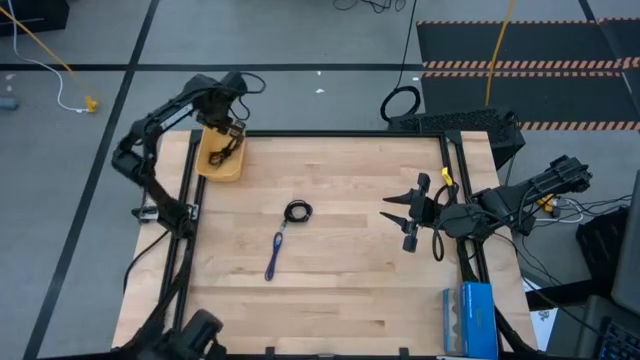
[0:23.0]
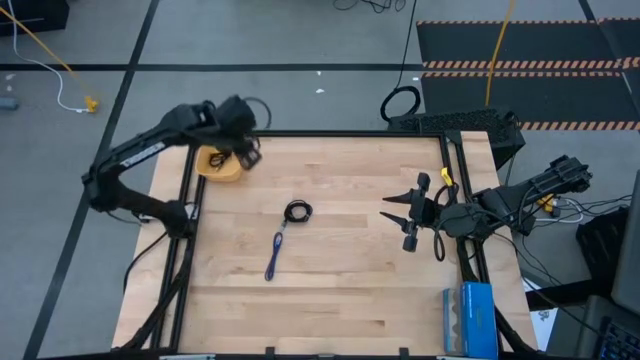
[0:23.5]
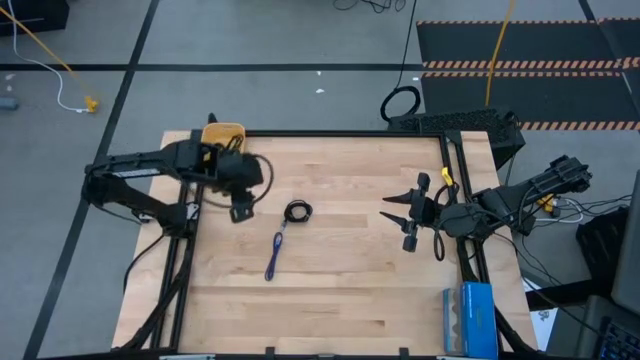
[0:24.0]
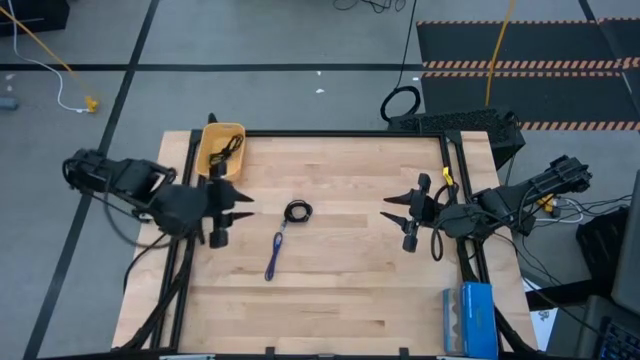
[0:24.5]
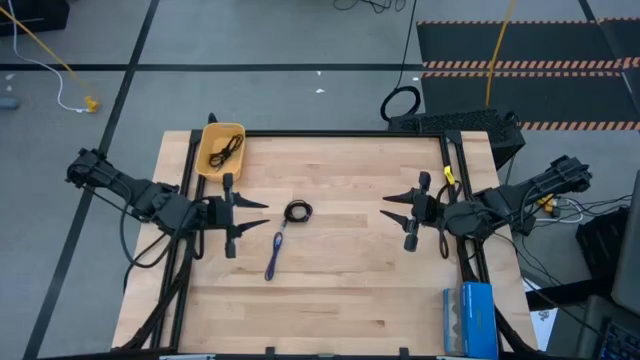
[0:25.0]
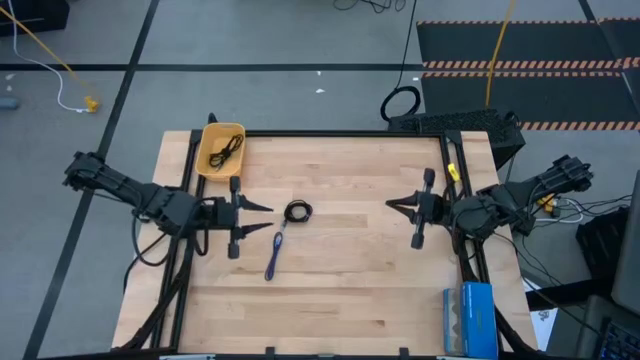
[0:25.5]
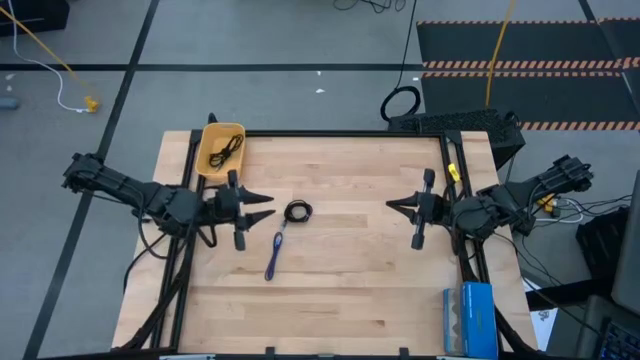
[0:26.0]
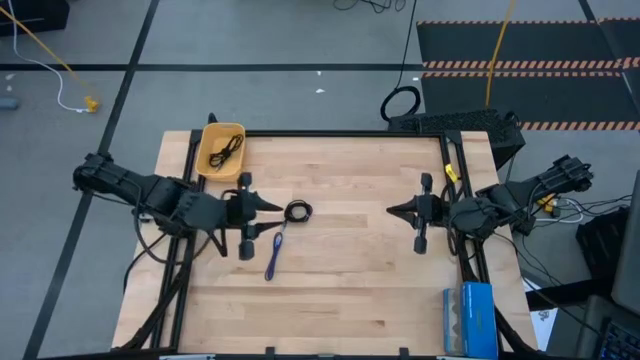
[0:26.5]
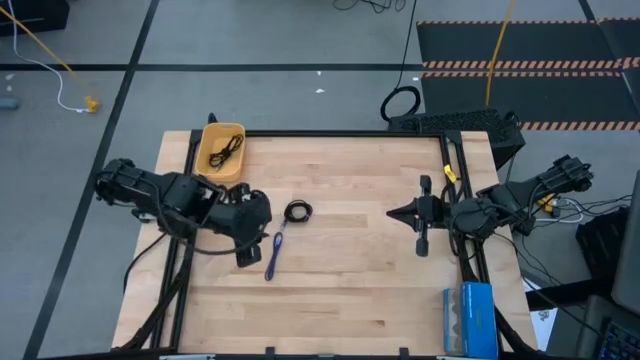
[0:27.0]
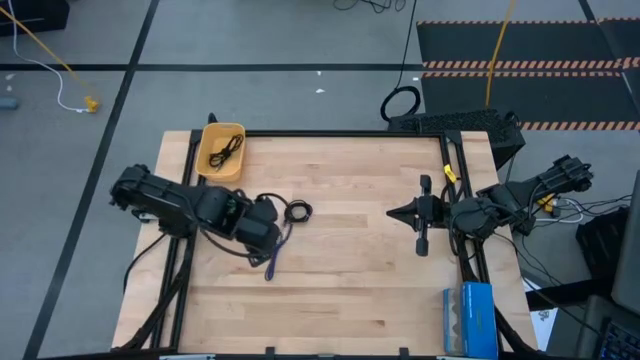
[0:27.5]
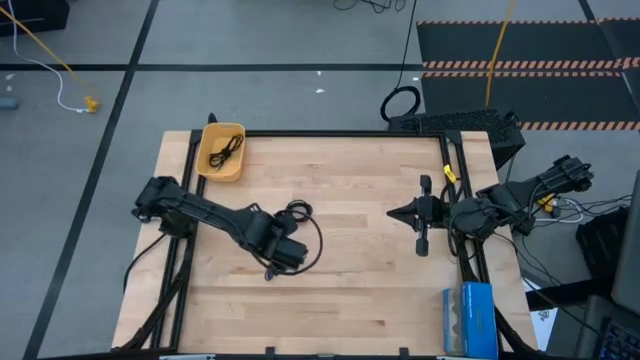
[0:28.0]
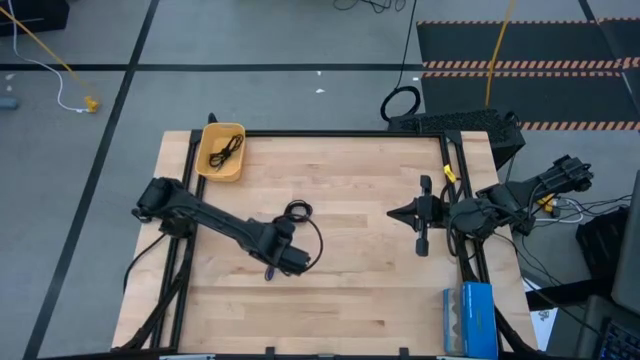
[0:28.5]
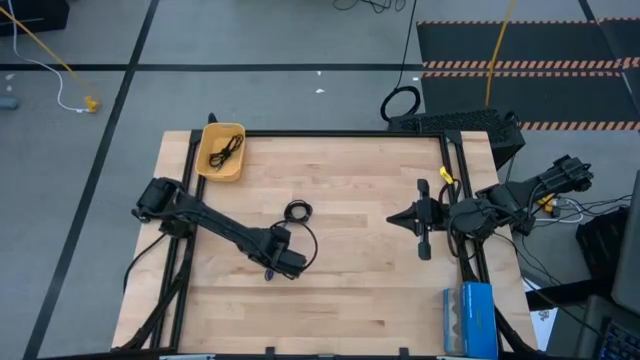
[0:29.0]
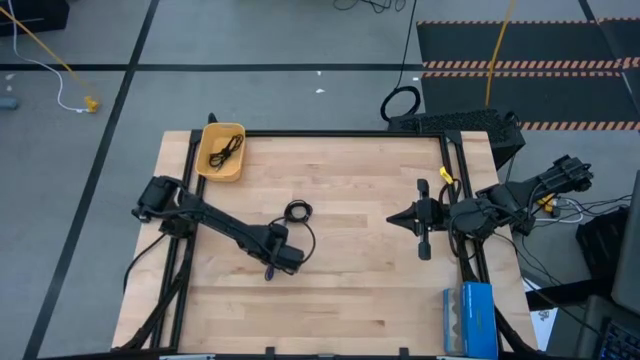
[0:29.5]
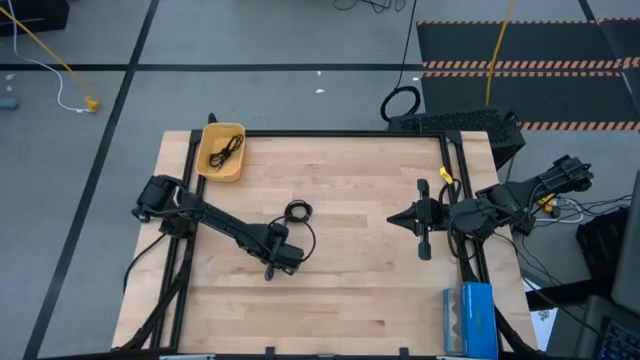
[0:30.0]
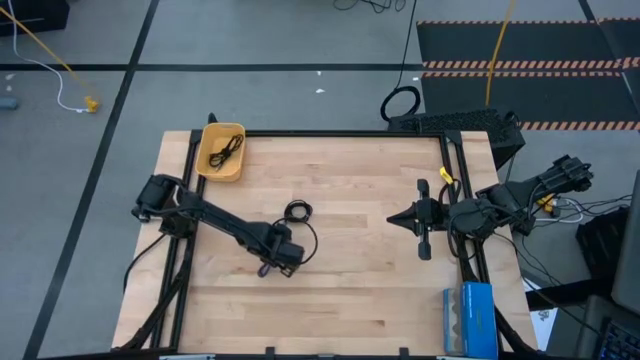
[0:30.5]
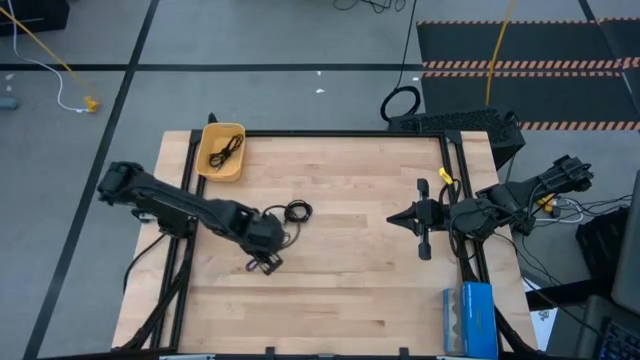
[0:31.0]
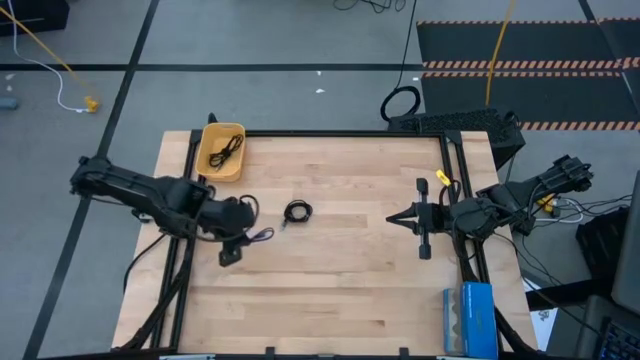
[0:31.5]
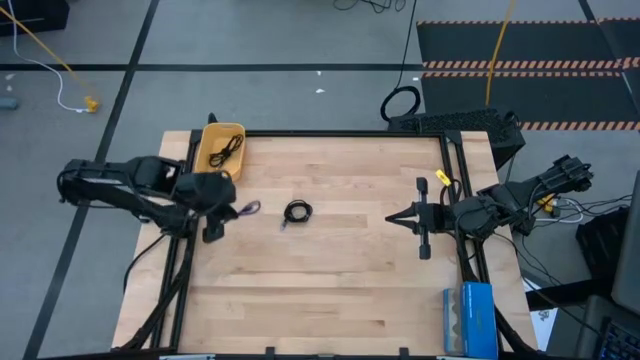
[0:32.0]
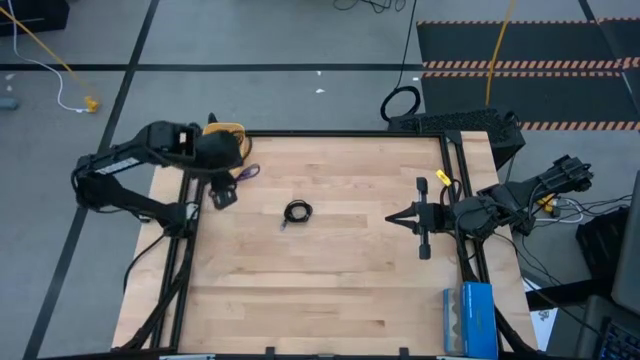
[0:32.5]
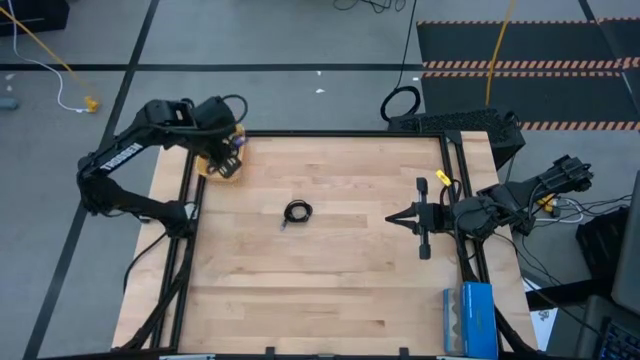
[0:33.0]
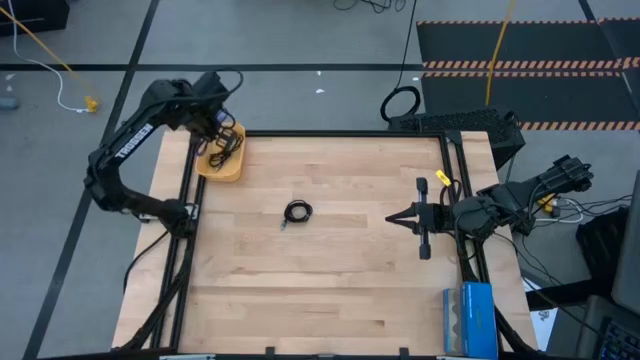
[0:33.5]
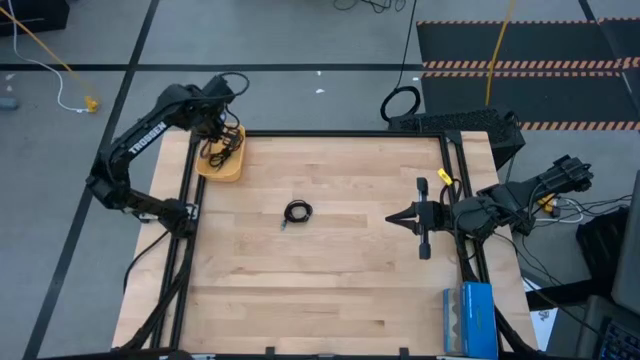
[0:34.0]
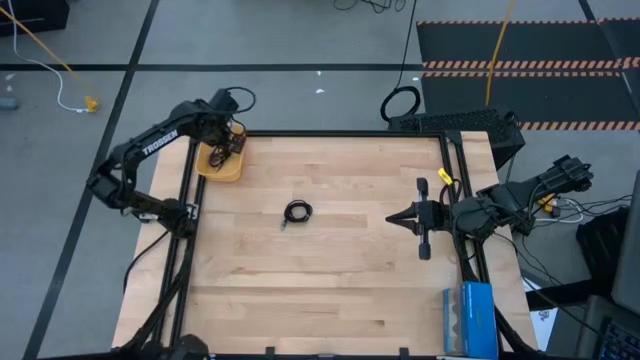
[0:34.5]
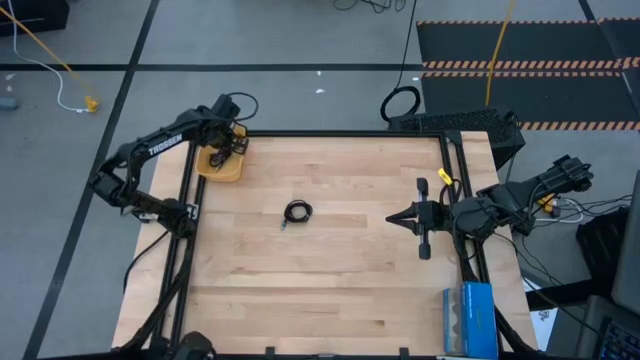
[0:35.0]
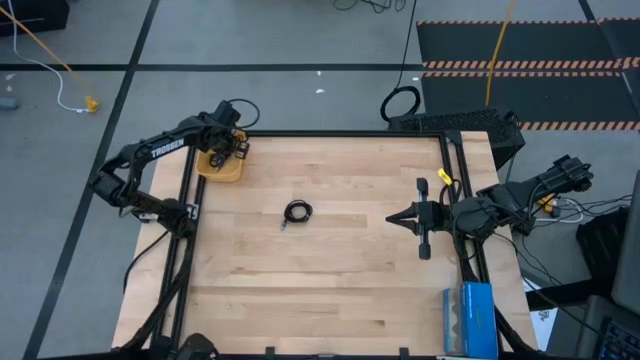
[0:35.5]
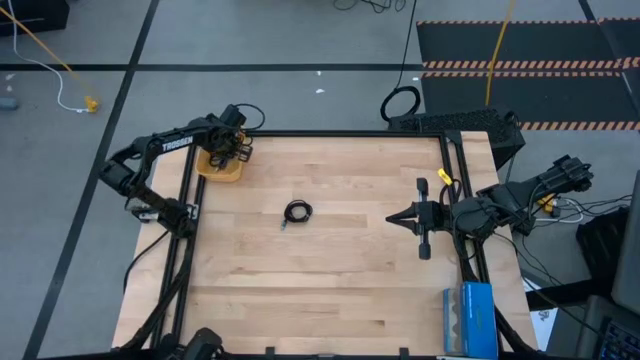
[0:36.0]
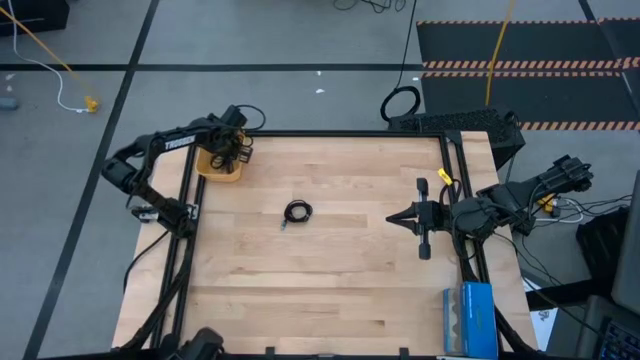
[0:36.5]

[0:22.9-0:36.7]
Task: Pick and place USB-C Cables
Put the violet charger cable into the yellow bin
